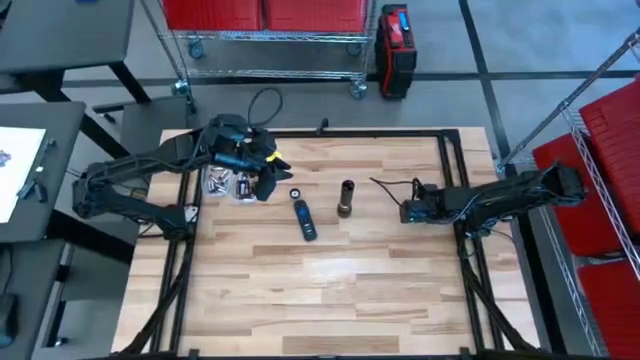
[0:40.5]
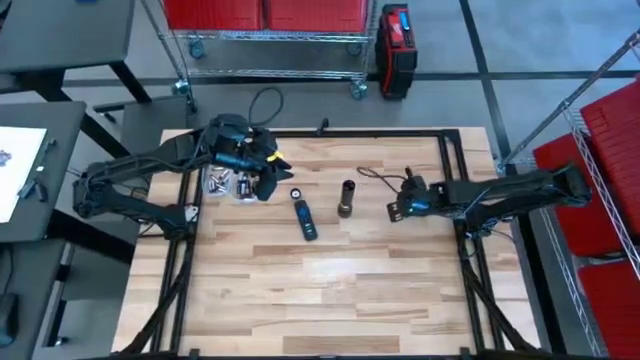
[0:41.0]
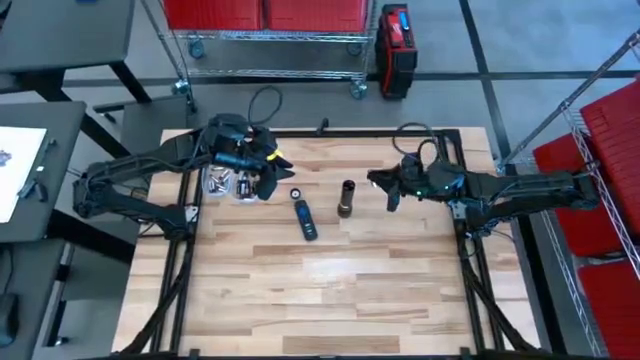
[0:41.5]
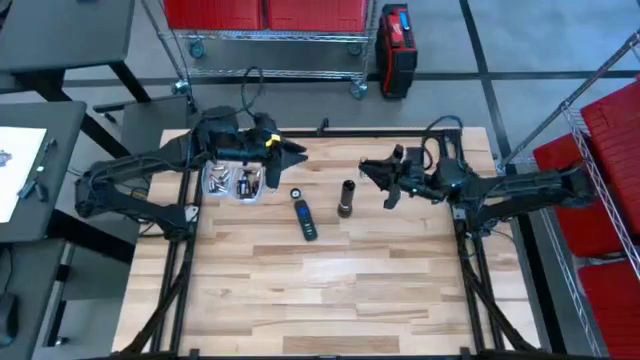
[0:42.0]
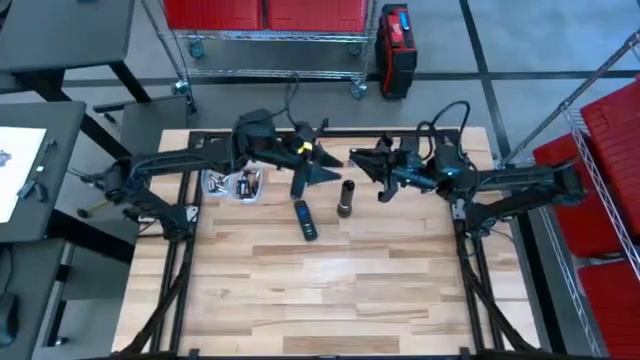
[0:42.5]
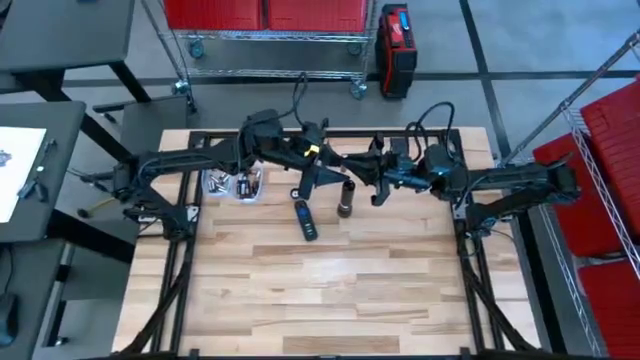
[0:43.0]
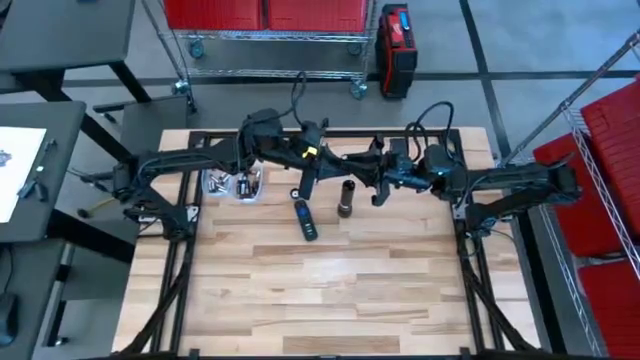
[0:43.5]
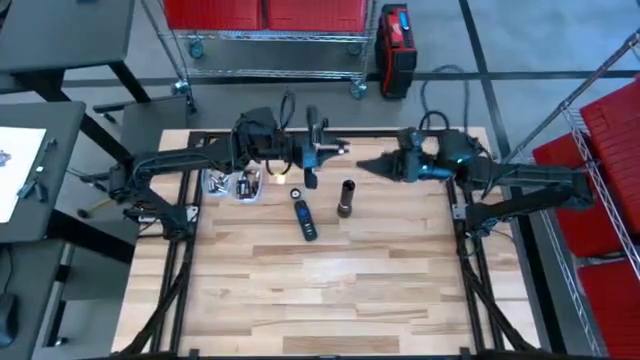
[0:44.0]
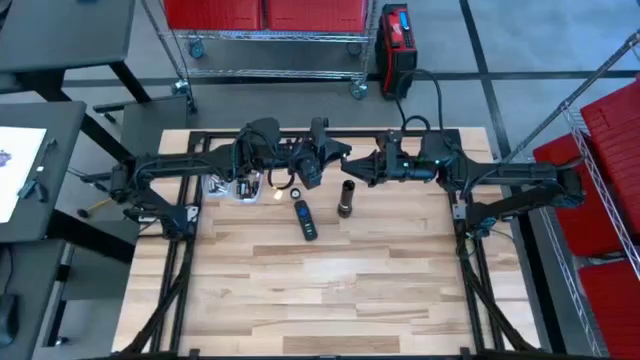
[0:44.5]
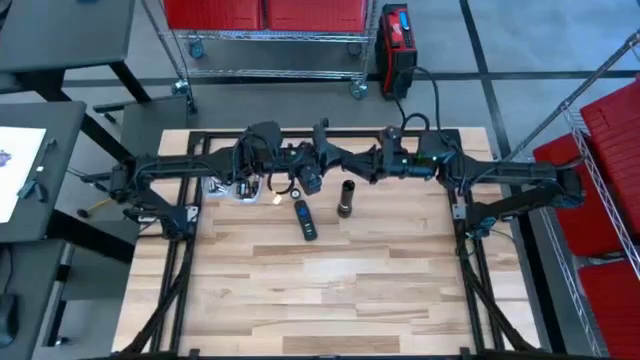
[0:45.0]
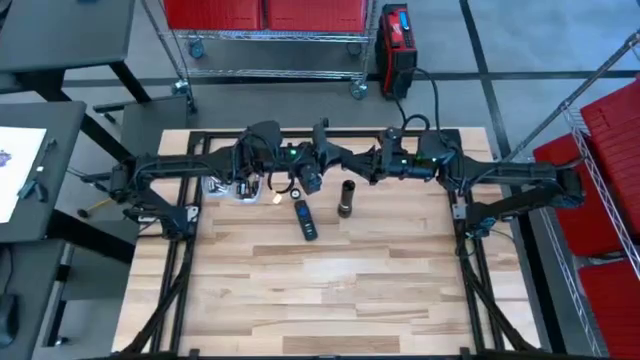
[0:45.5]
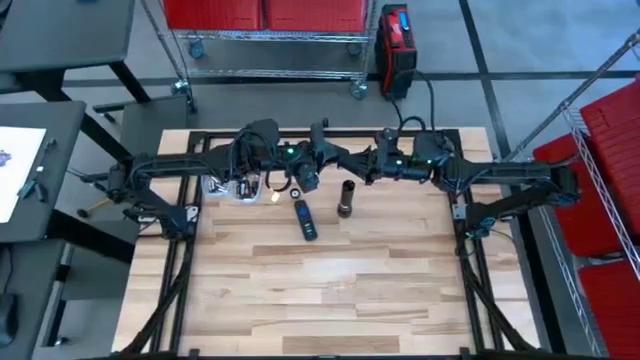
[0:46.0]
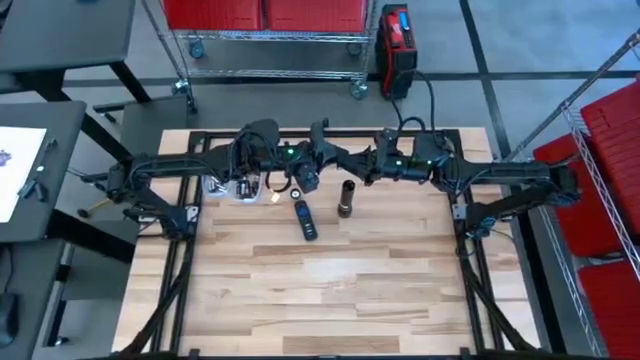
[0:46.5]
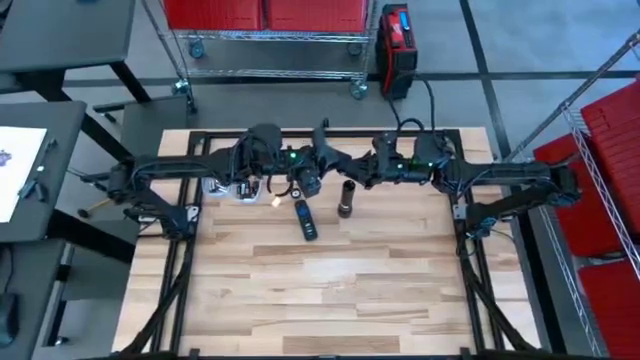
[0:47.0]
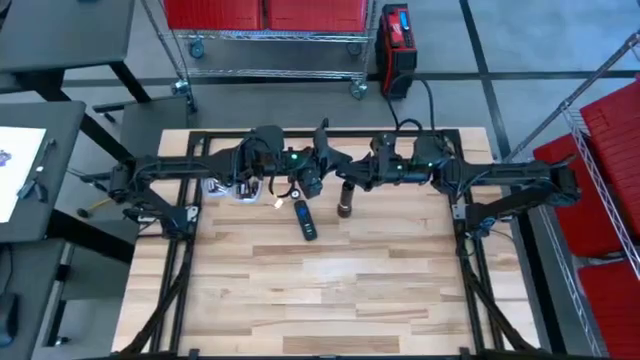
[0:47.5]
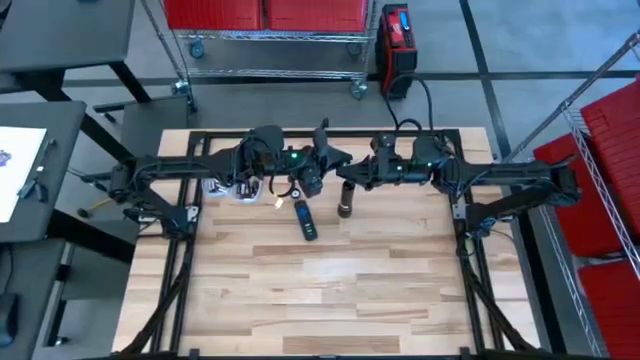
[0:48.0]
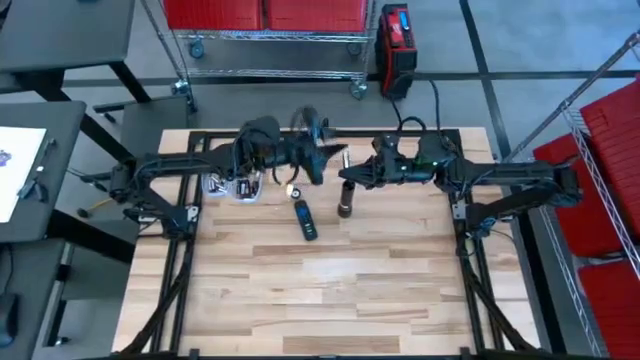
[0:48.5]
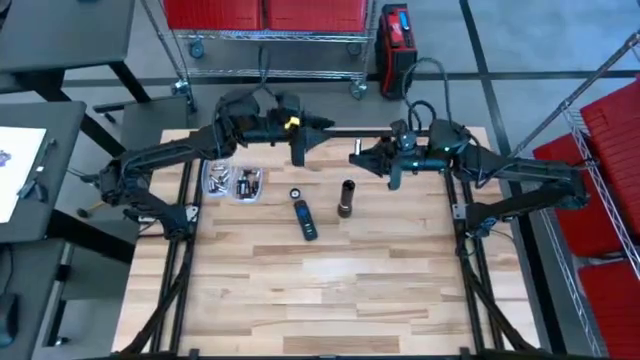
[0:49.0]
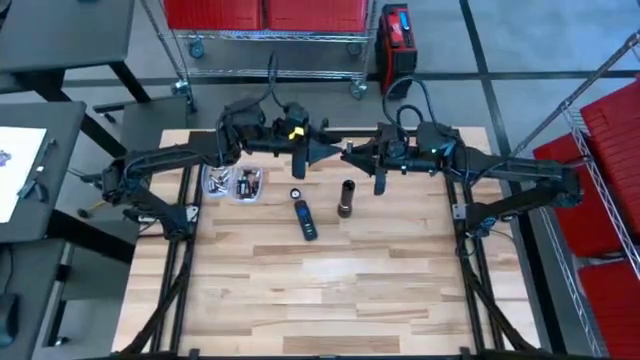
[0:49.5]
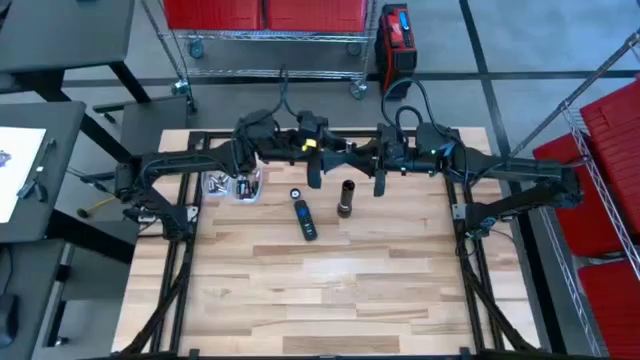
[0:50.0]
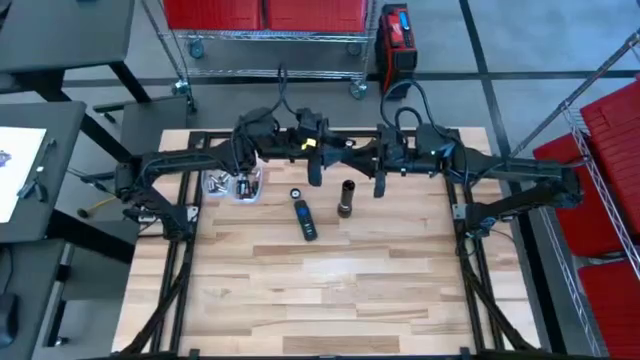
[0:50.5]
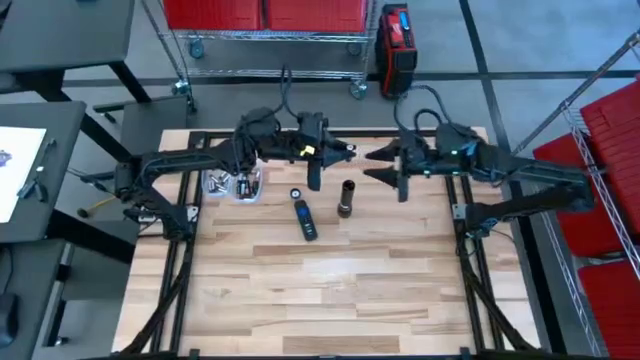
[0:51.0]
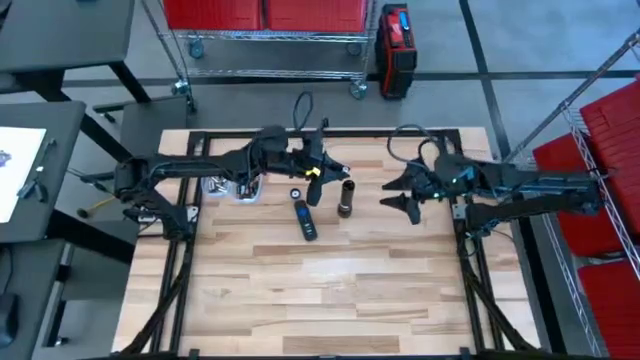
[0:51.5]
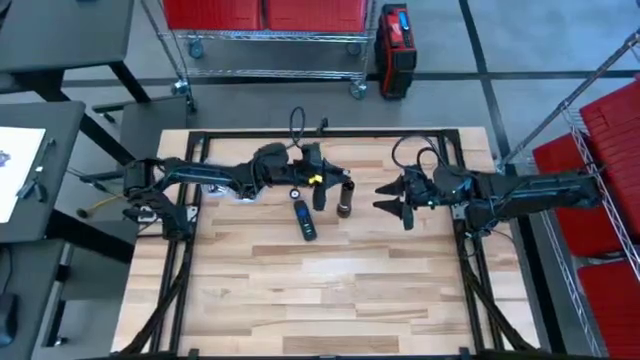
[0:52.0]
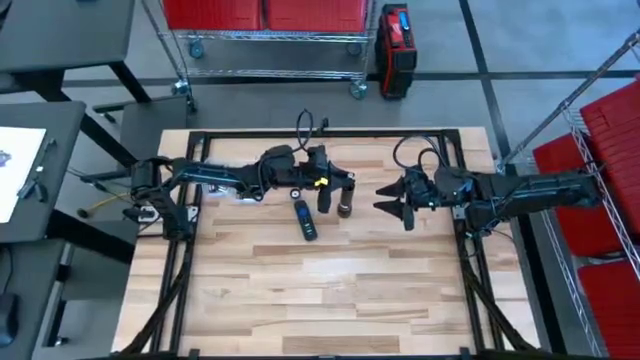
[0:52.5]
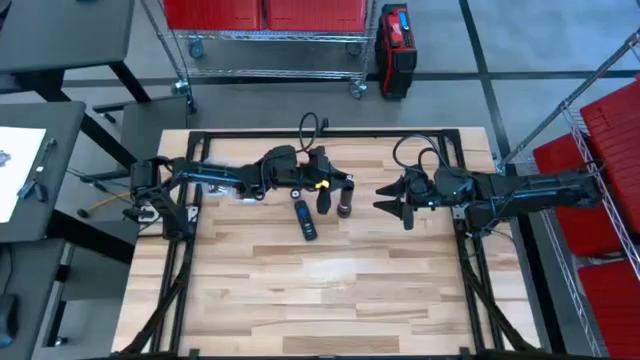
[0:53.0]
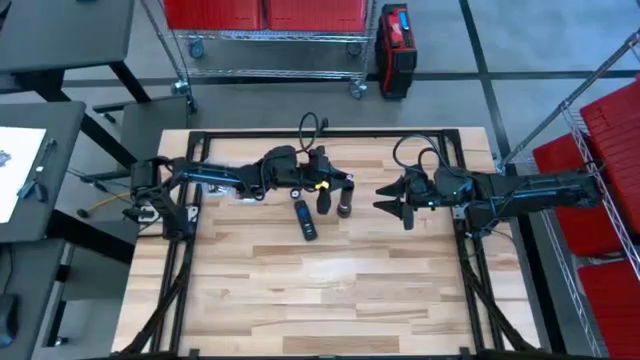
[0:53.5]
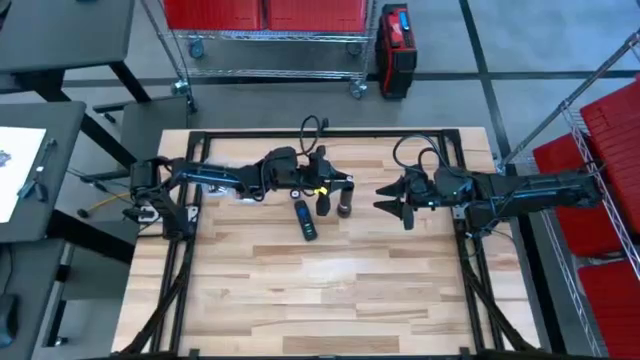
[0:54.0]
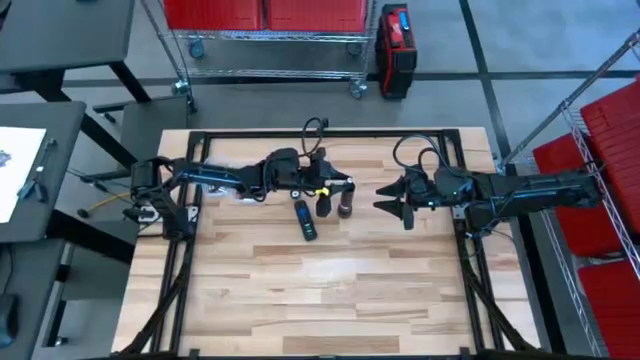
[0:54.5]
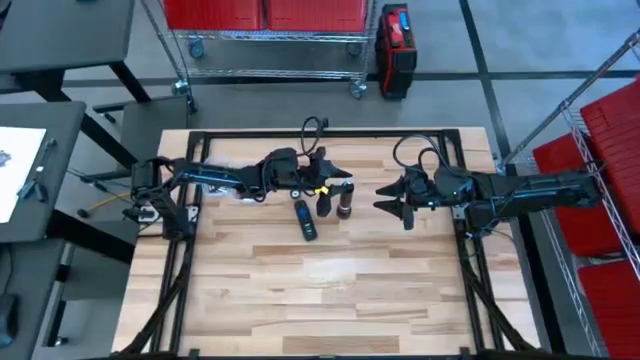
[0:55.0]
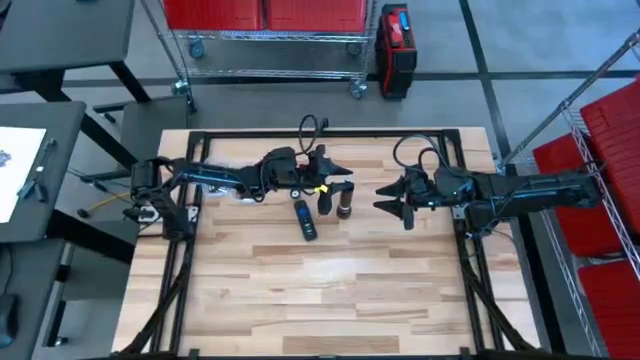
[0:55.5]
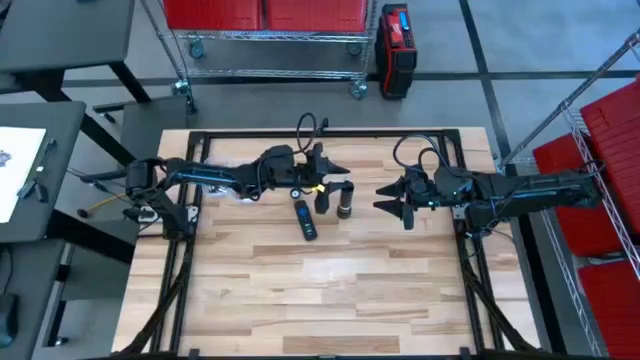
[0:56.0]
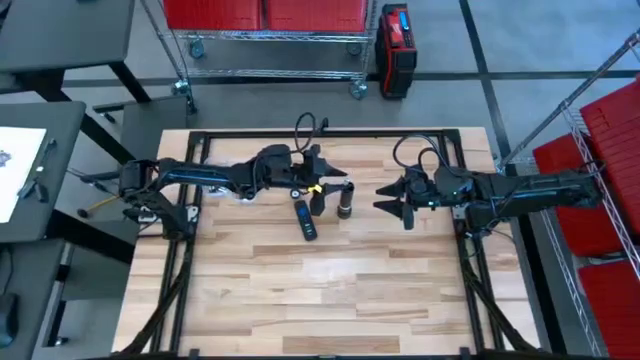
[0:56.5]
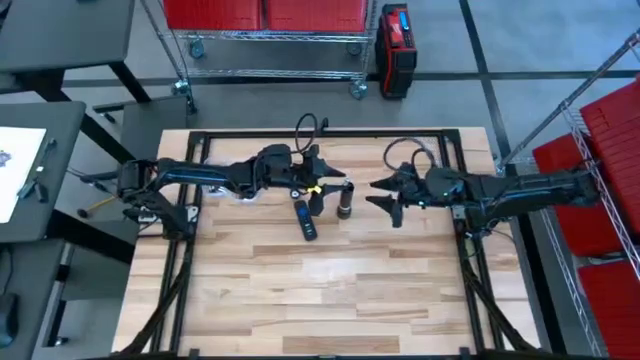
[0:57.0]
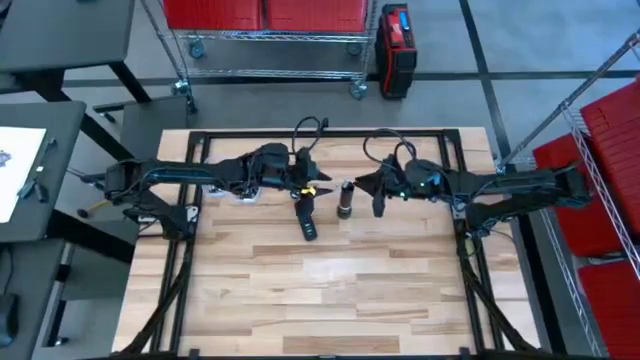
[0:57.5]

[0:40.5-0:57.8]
Task: Insert battery
Insert the silver battery into the flashlight's battery compartment

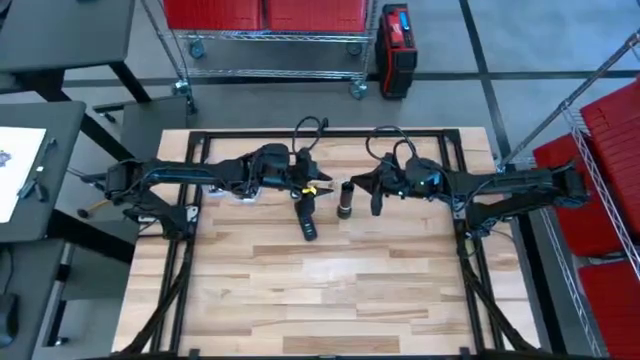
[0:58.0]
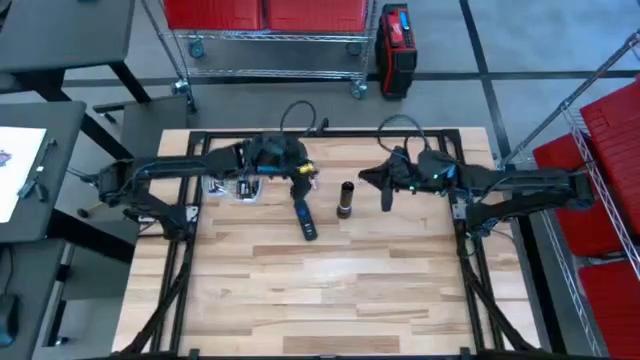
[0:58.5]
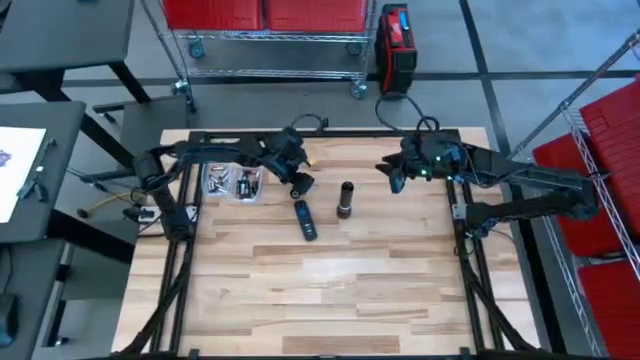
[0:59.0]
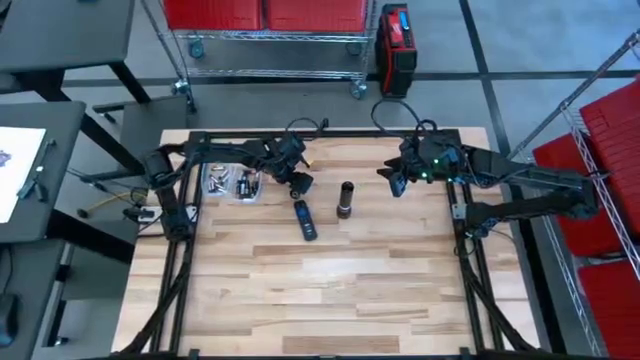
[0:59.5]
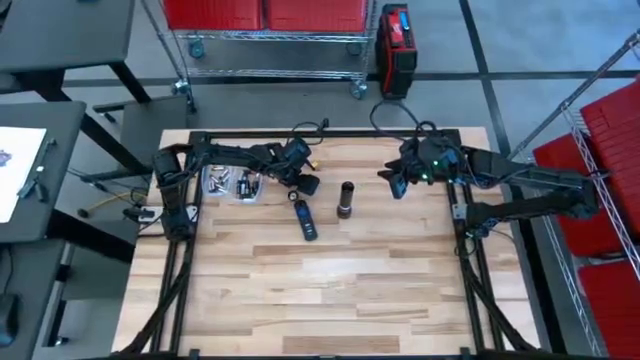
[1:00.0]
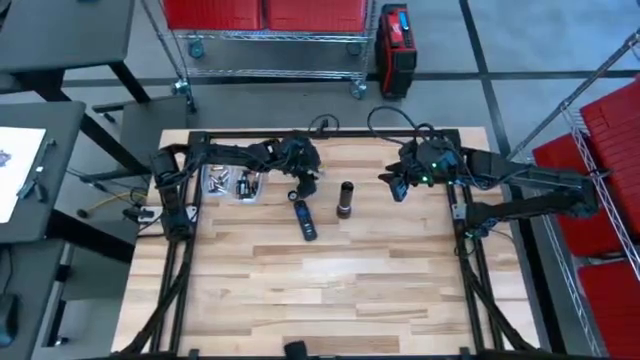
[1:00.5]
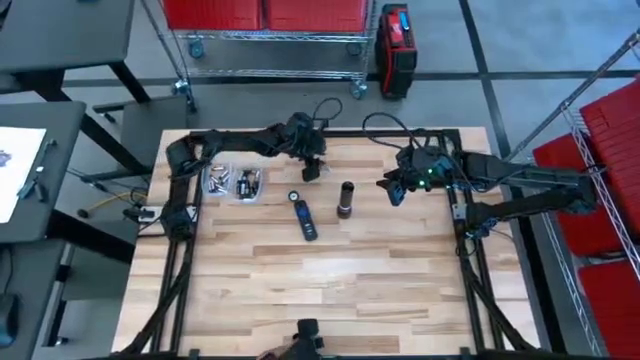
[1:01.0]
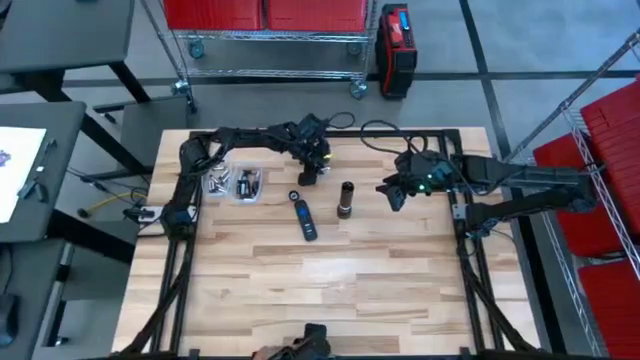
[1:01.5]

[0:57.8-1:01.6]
Insert the silver battery into the flashlight's battery compartment

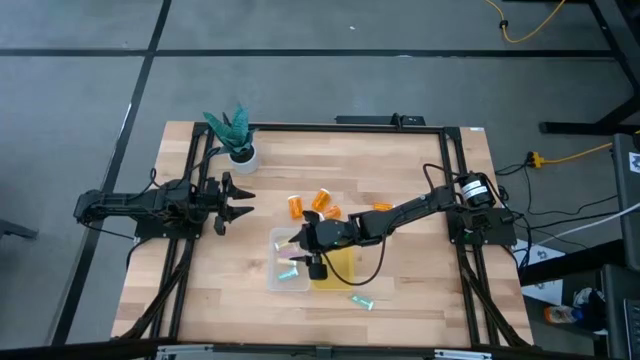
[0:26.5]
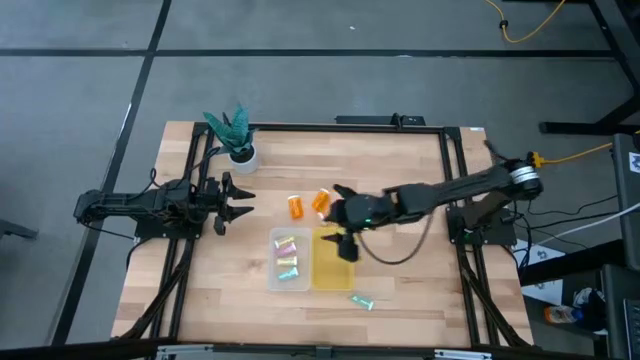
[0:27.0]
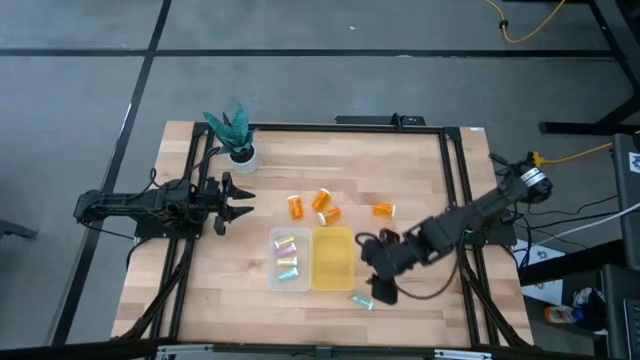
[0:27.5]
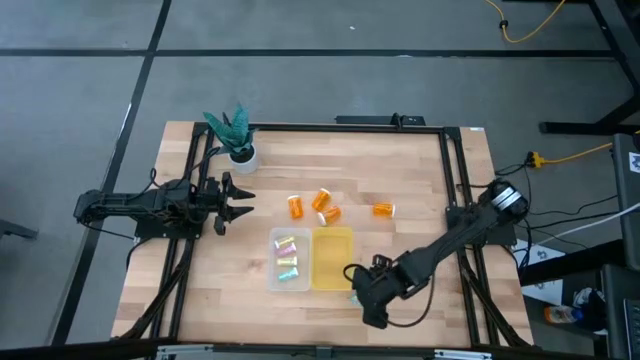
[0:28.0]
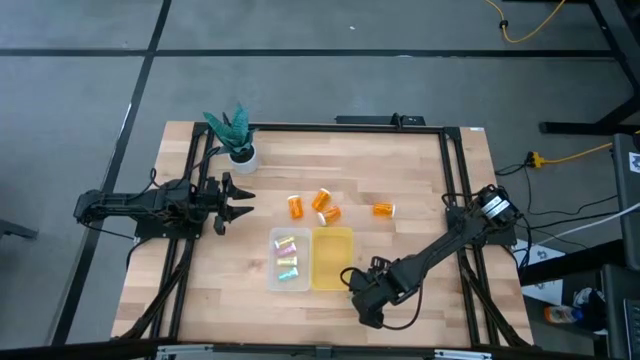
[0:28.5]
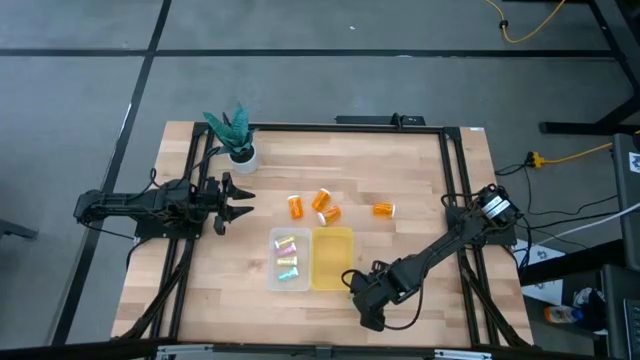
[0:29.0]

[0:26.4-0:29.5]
Task: Pick and place medicine bottles into bin by pill shape (circle, oval)
Put the blue tablet bottle into the transparent bin
